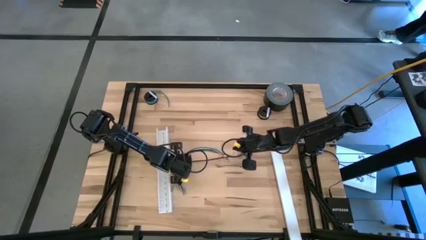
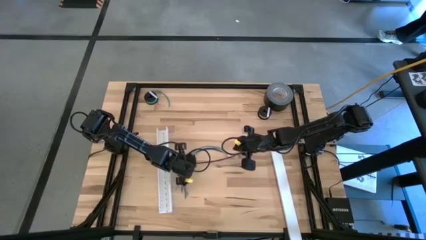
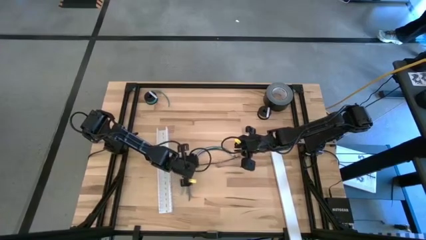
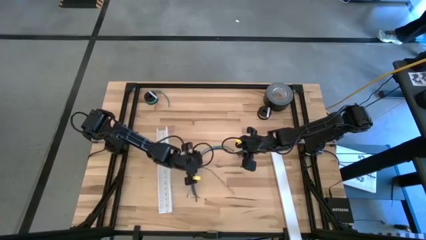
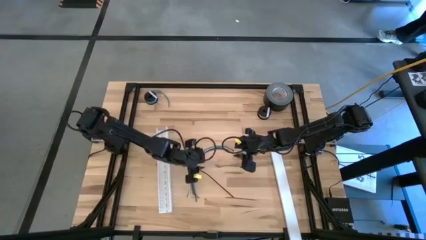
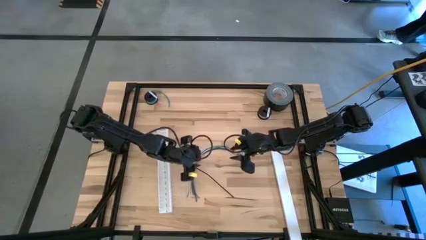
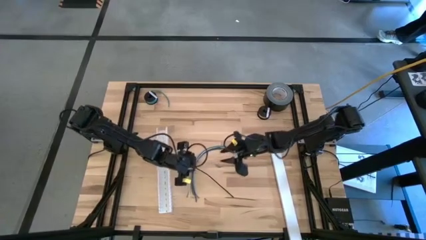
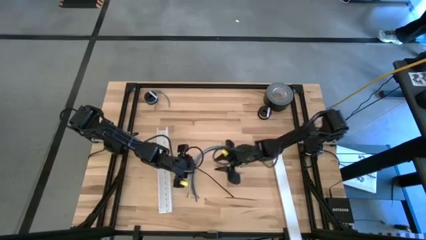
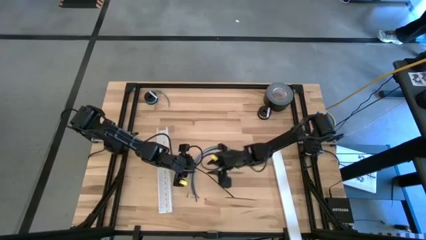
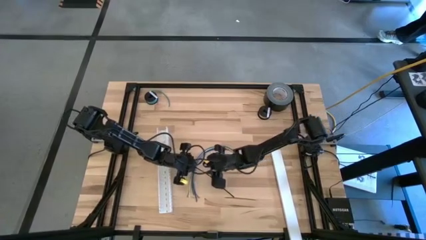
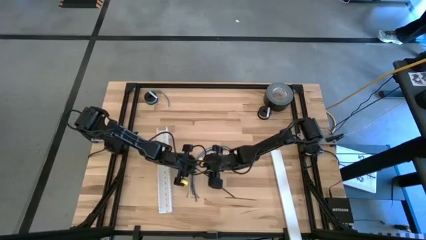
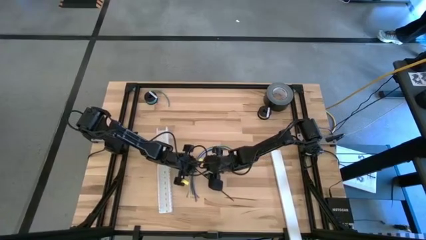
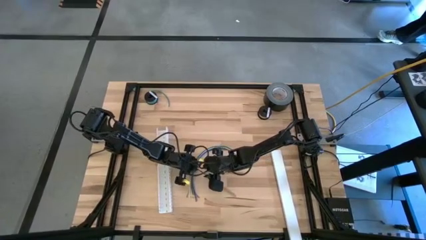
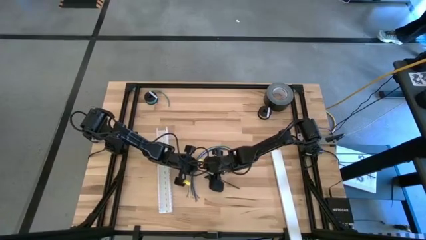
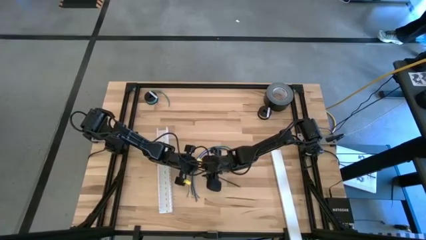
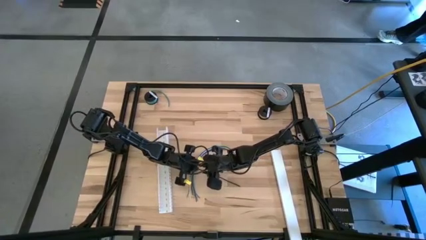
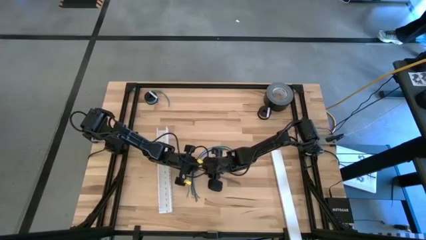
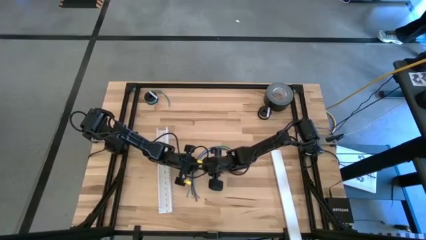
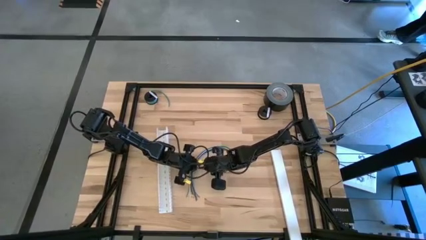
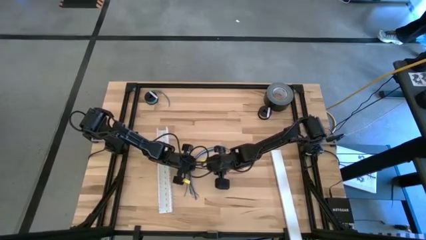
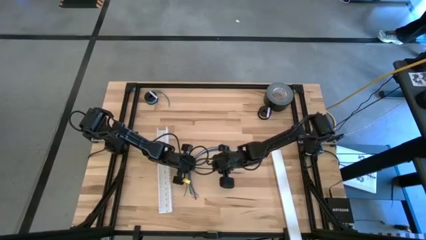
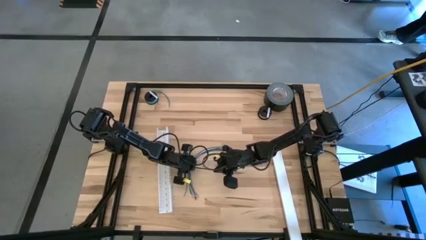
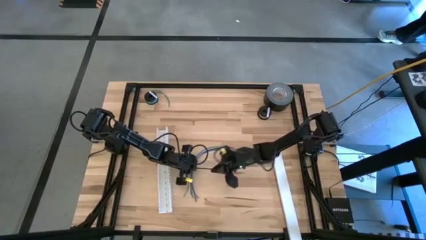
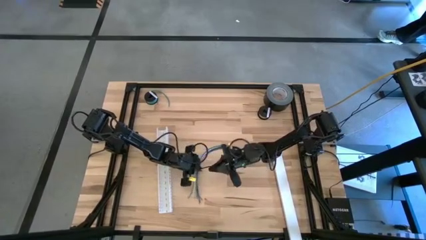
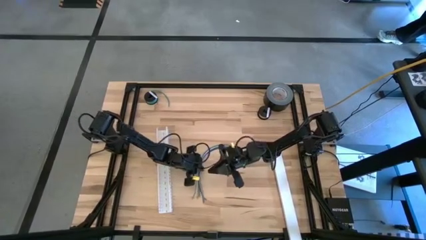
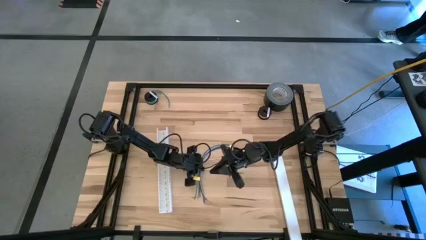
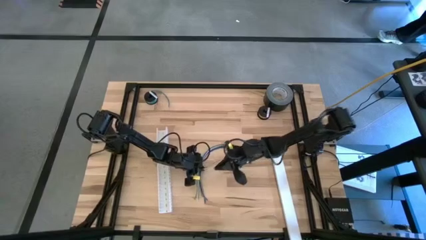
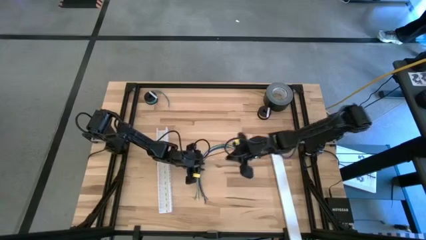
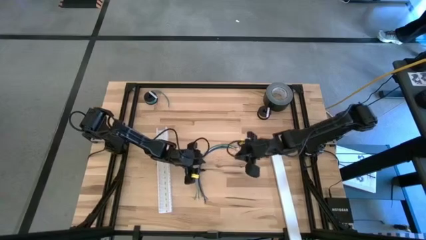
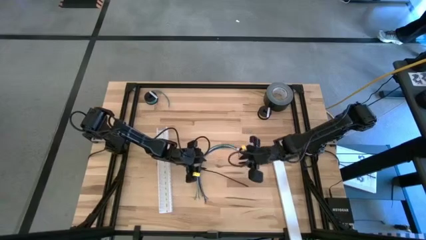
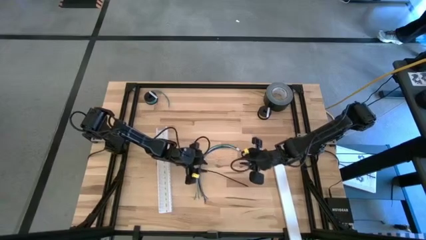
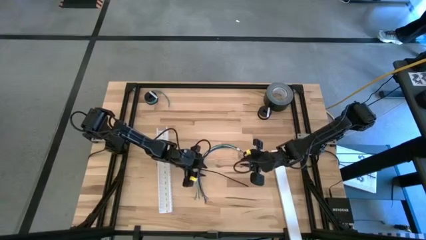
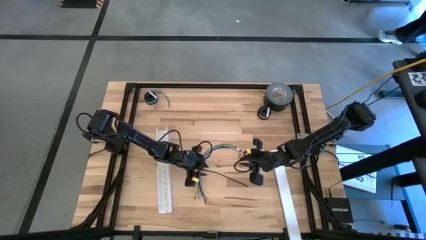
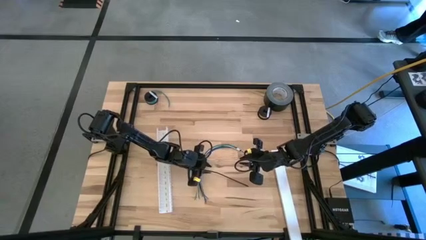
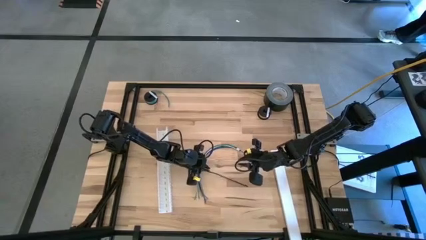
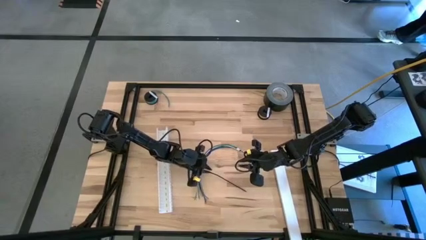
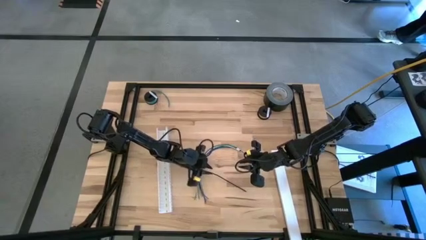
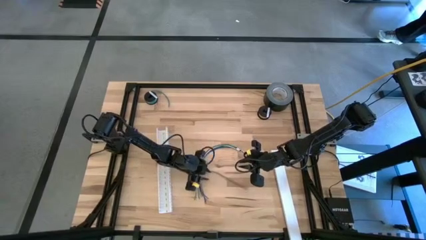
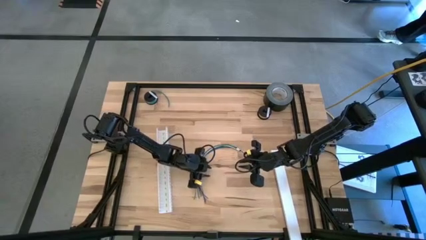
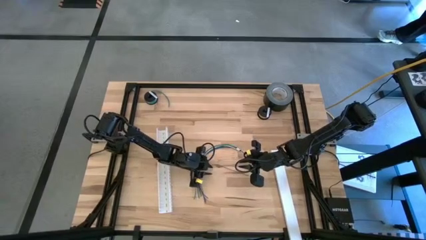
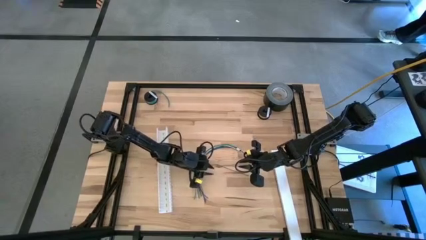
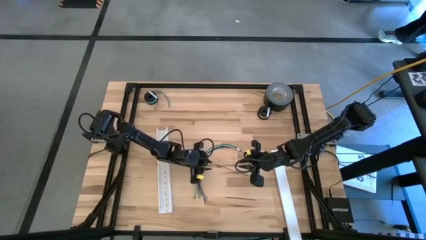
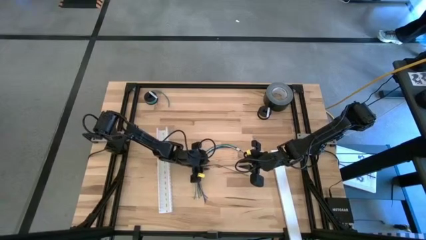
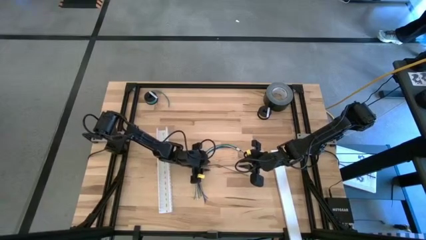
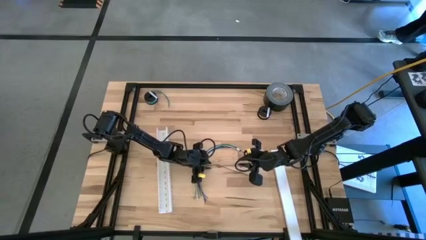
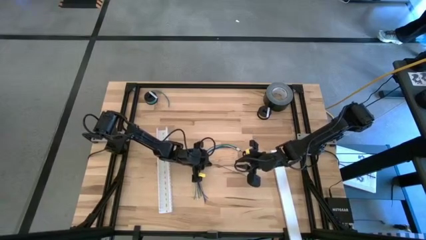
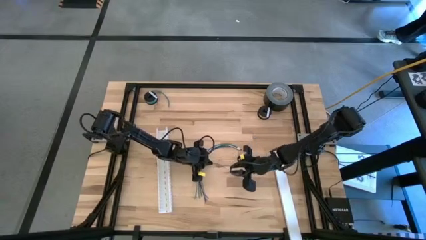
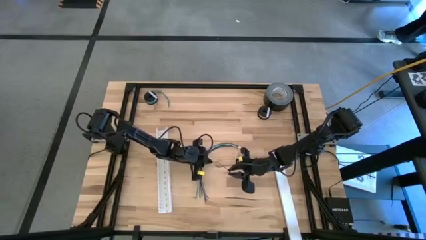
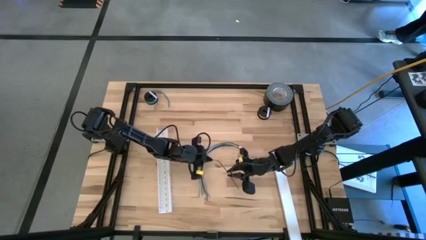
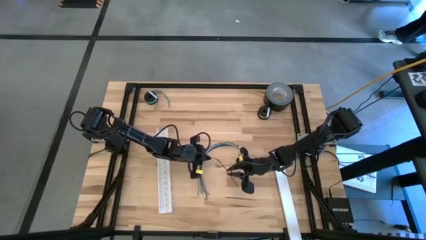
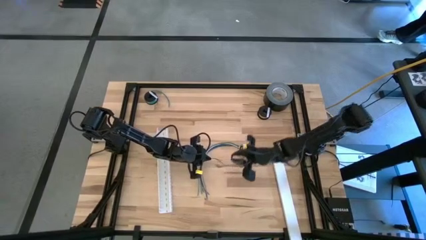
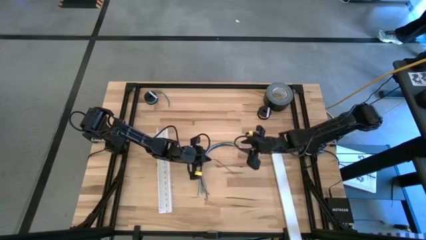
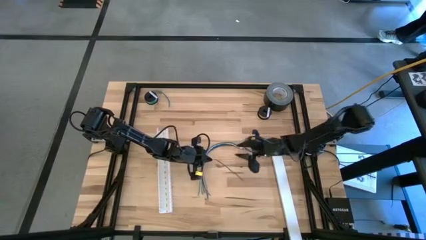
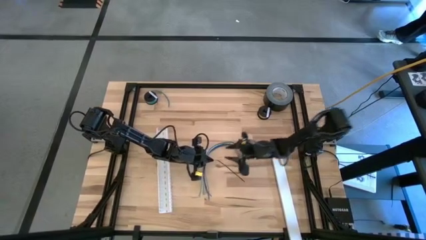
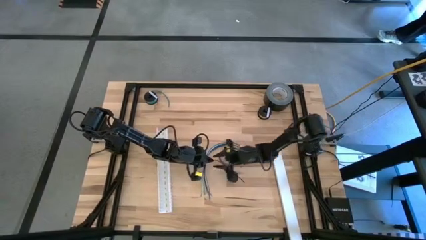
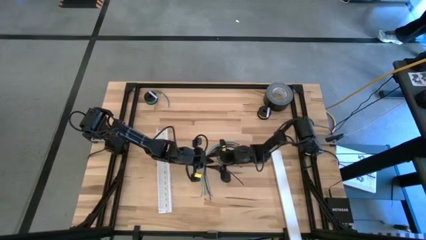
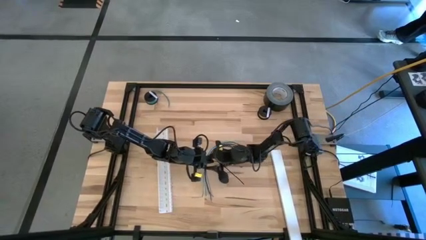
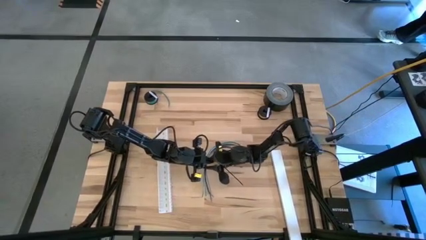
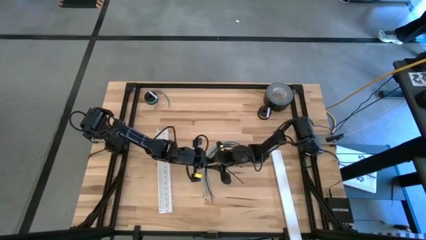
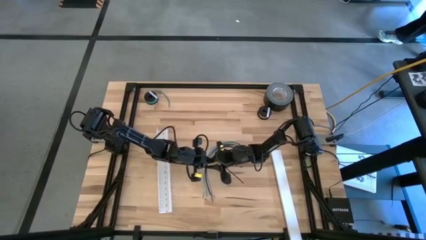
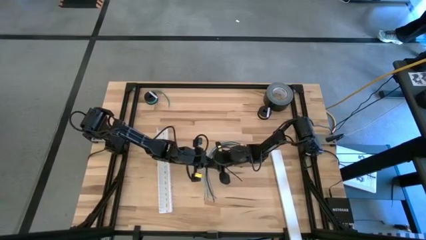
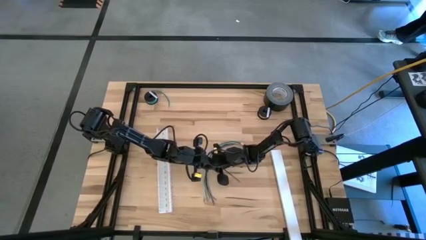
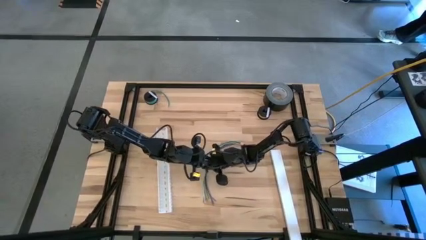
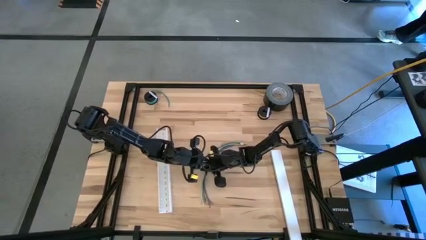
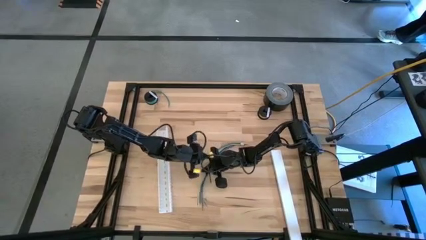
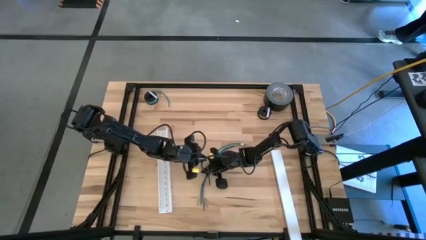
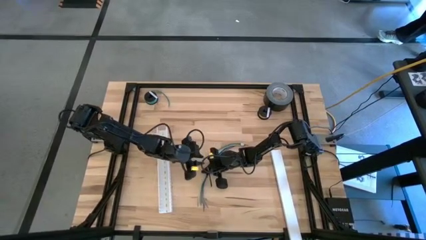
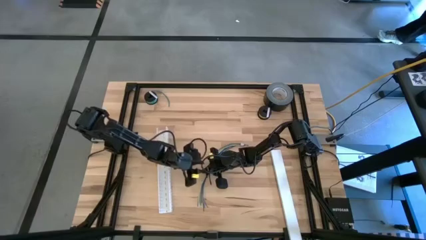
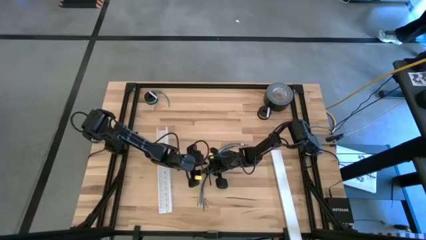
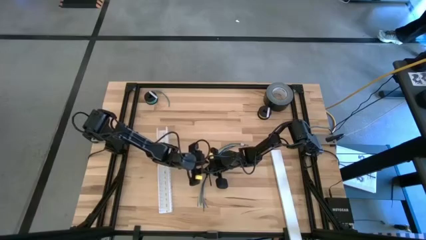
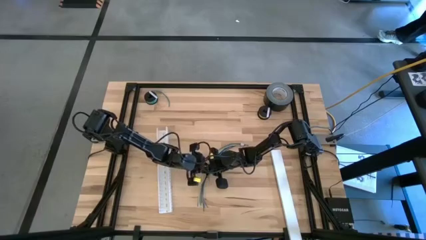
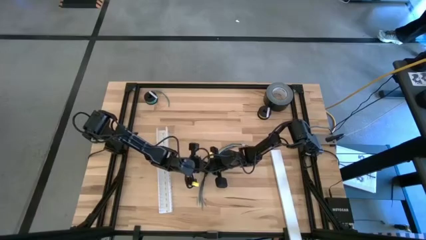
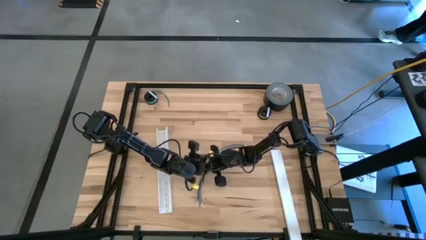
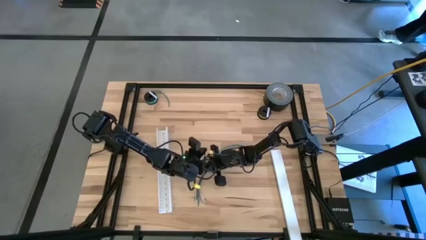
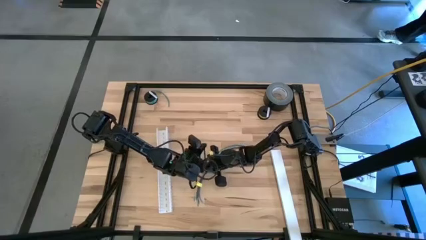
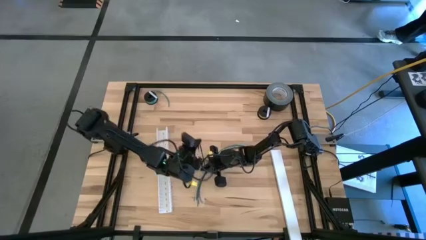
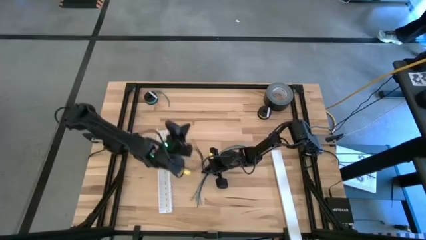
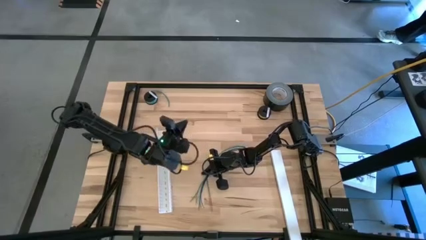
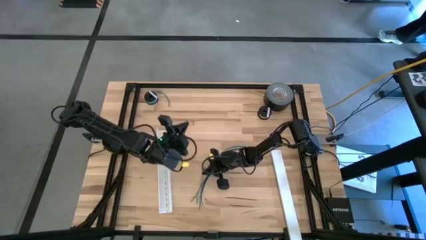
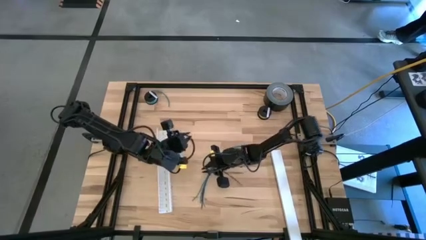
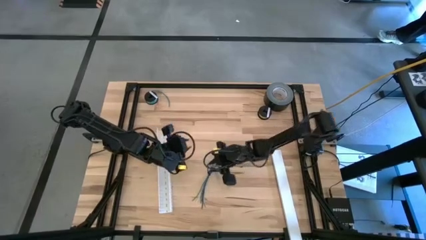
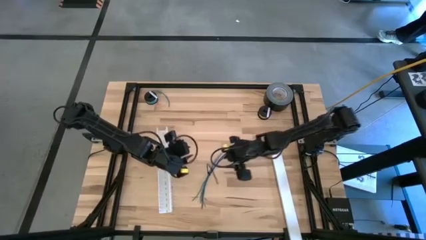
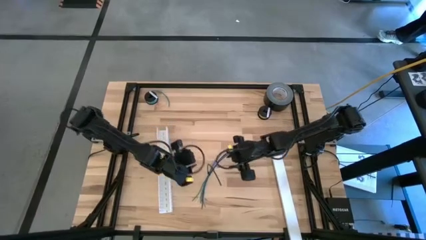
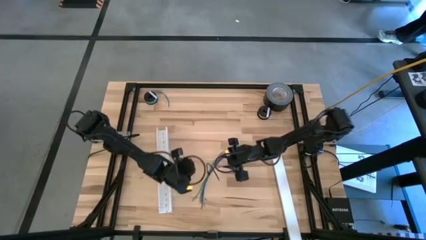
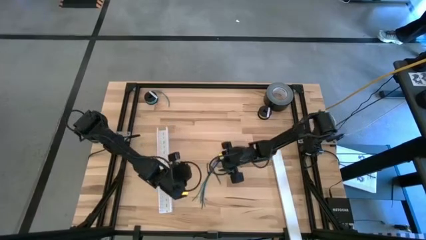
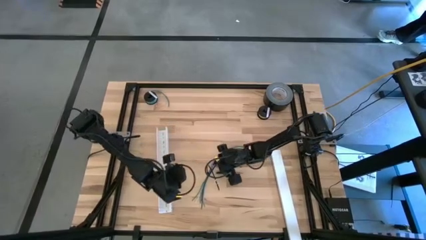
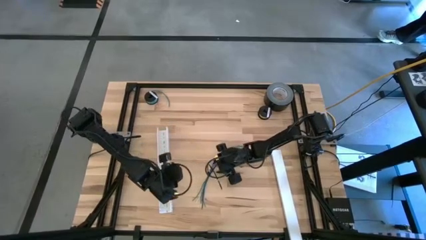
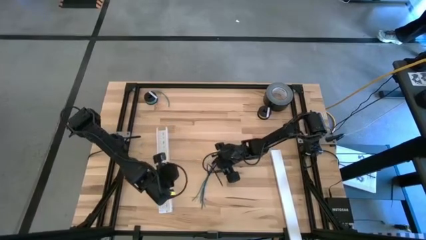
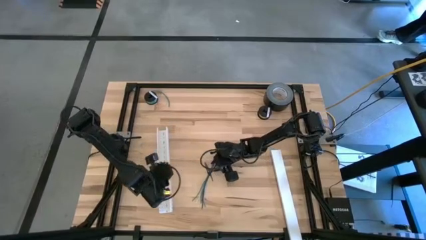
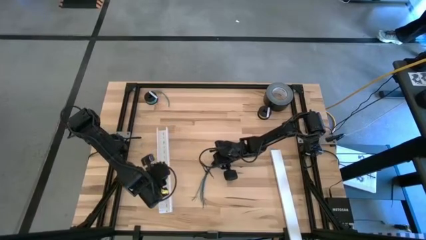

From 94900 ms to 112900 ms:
Task: Ziptie cables
Wrap the colored cables with the black zip tie
